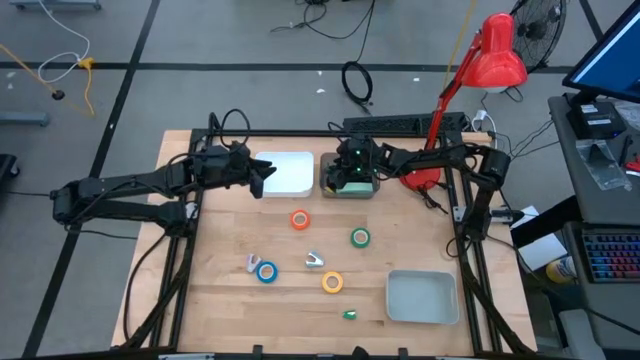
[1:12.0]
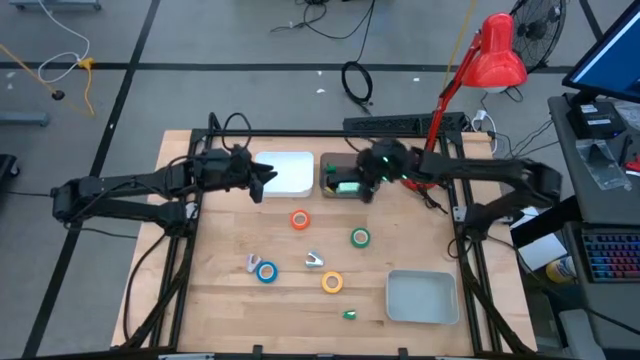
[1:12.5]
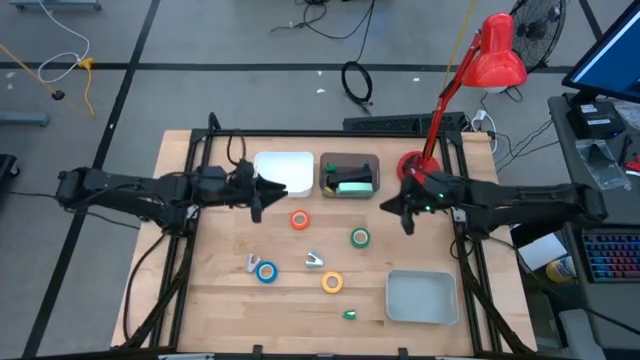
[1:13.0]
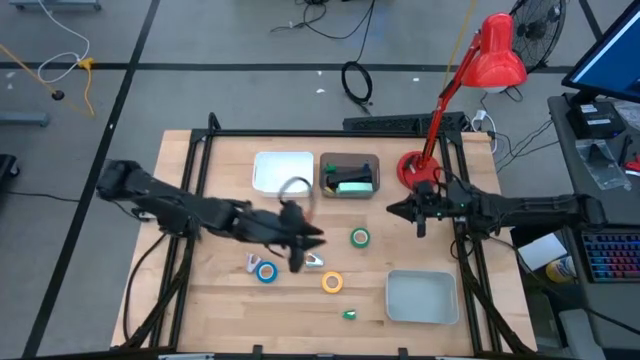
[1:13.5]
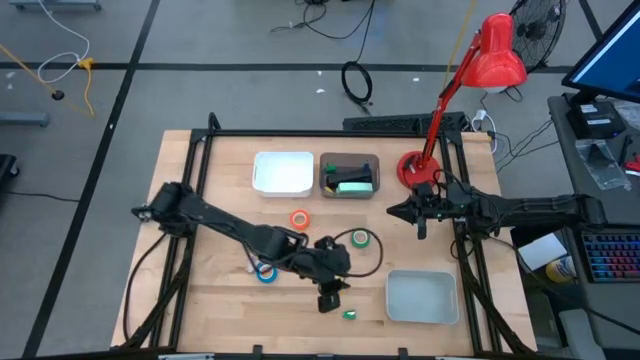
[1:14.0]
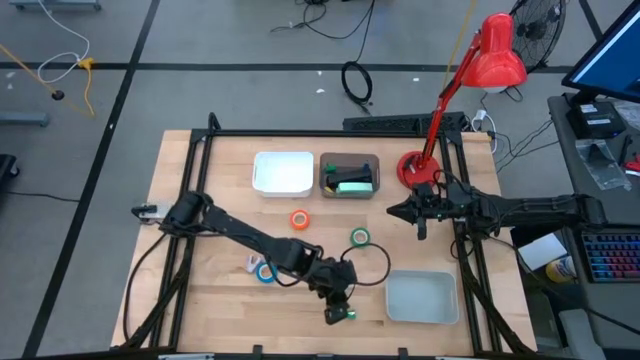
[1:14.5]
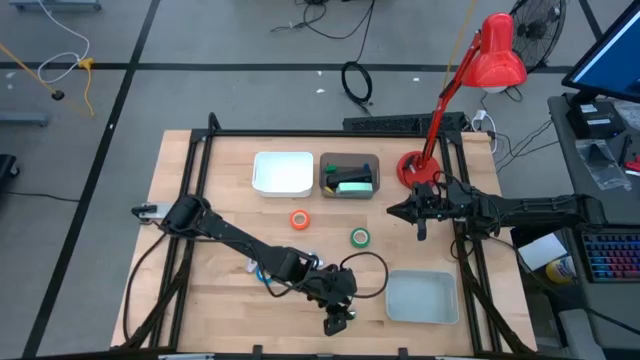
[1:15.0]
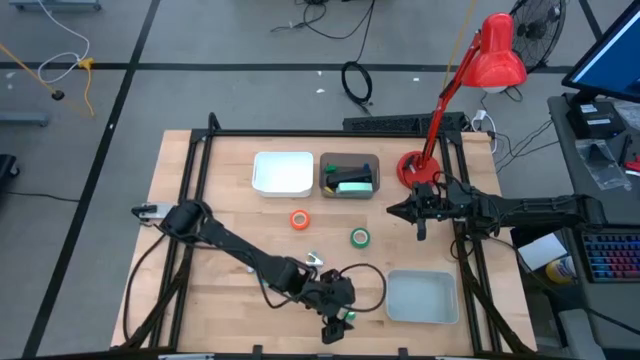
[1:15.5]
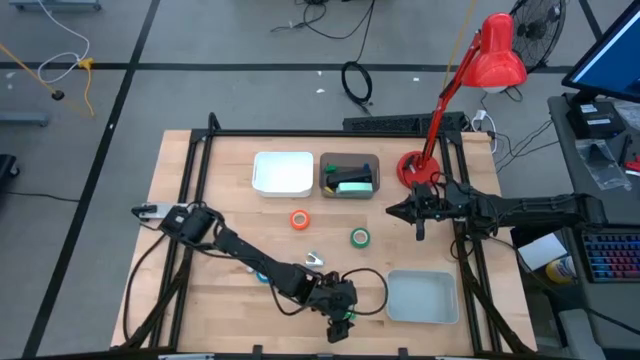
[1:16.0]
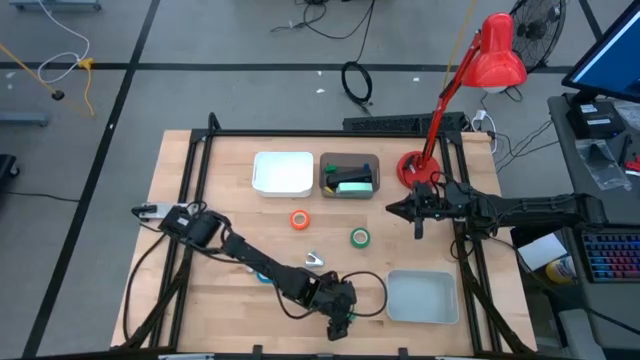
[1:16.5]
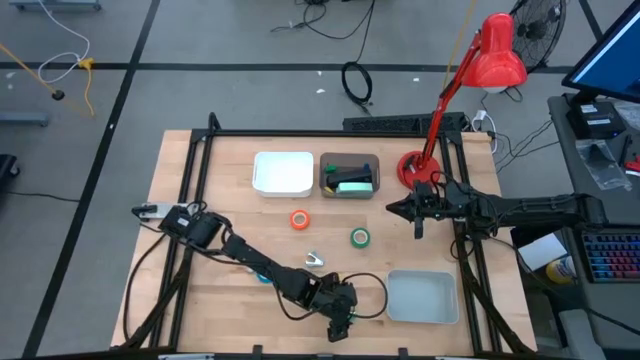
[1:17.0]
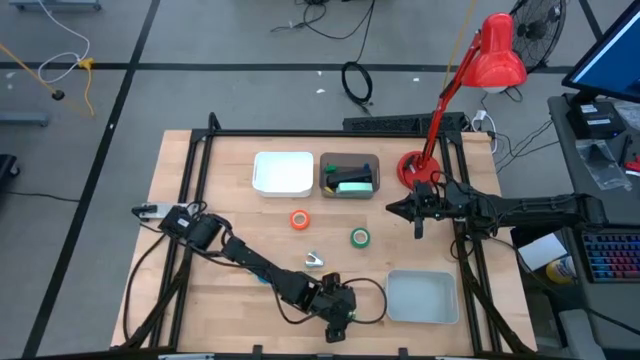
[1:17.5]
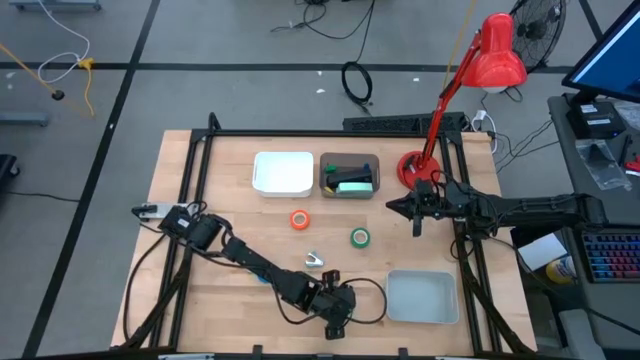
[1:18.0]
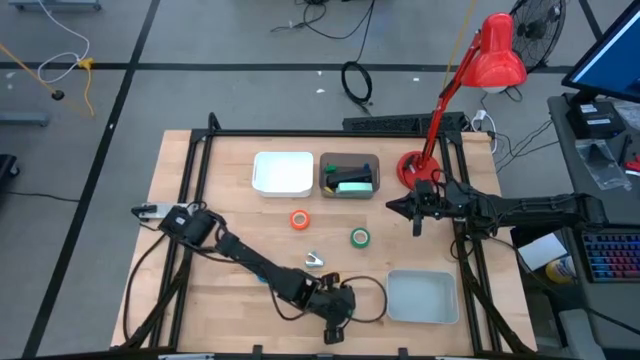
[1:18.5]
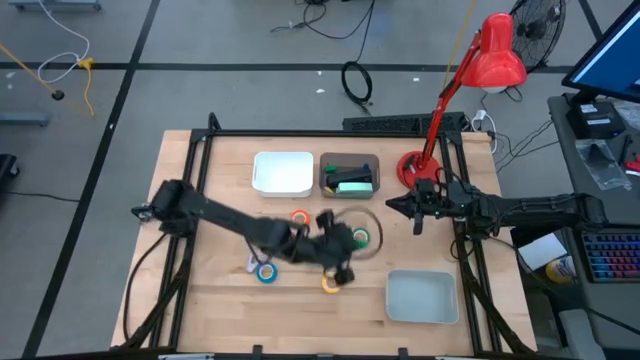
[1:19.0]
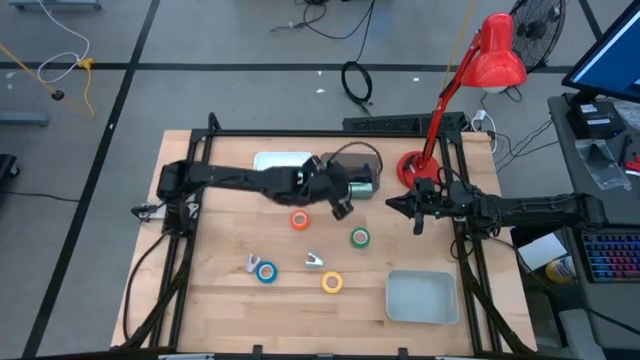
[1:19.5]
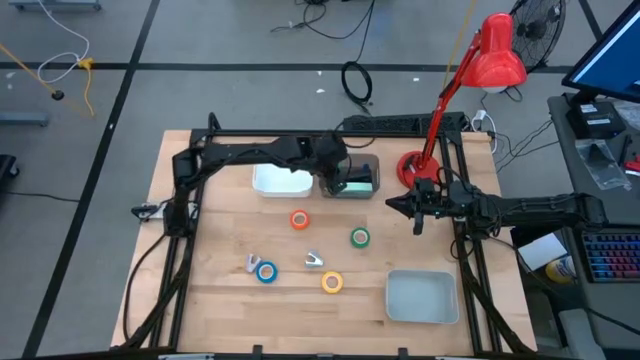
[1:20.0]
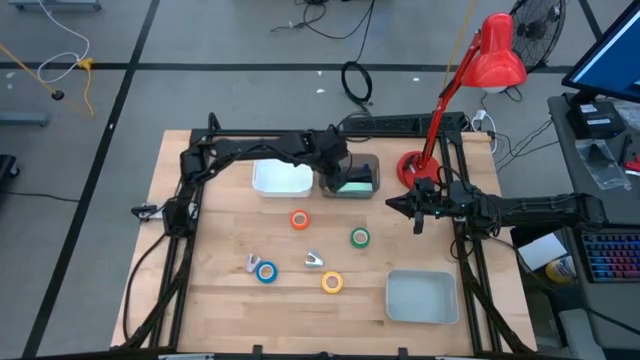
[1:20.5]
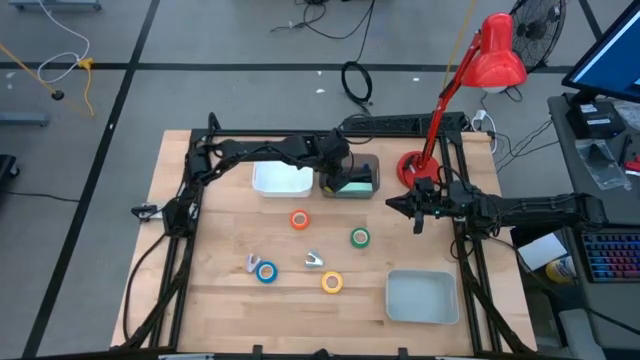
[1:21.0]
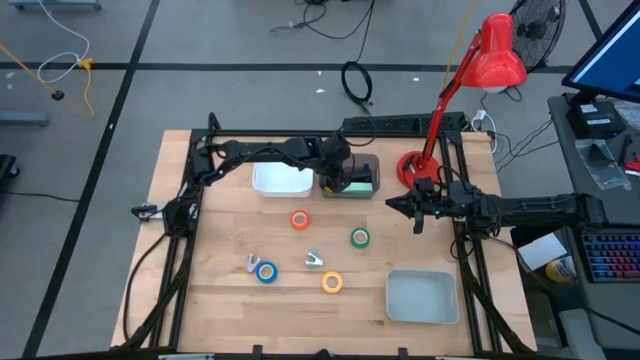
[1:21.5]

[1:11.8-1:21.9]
Task: Pick and place Stapler, Stapler remover, tape
Put the green stapler into the black bin

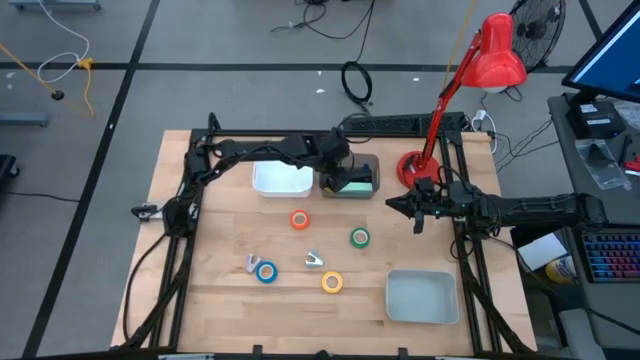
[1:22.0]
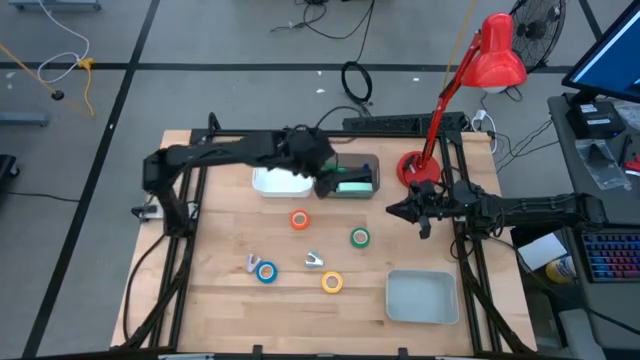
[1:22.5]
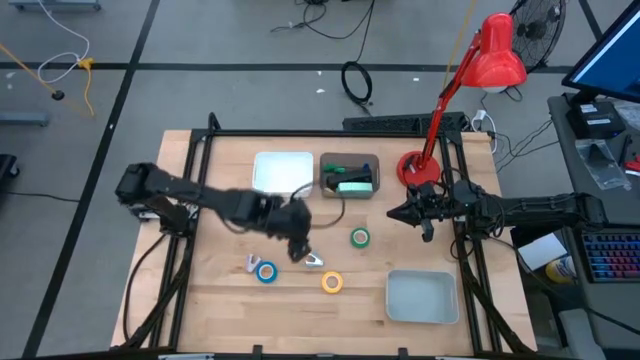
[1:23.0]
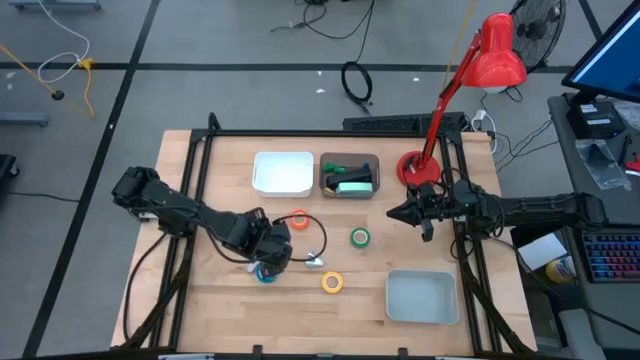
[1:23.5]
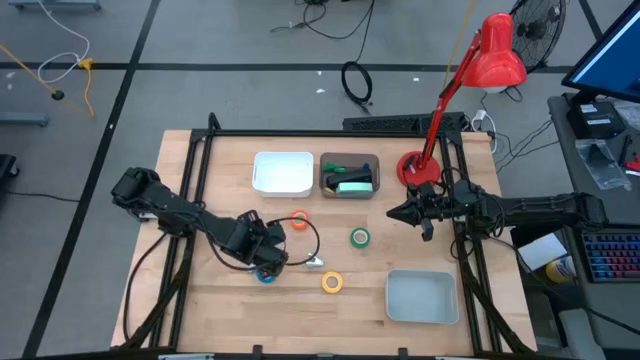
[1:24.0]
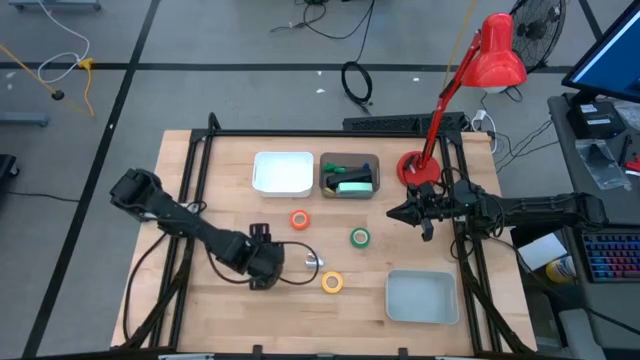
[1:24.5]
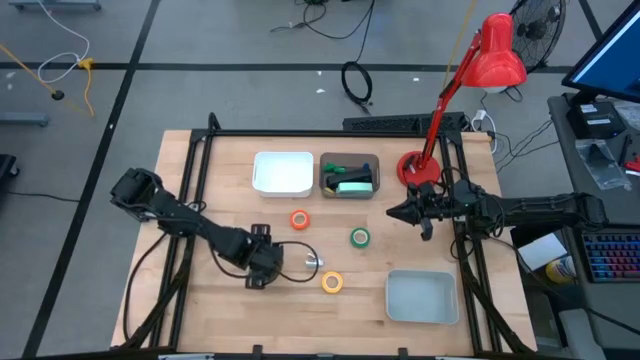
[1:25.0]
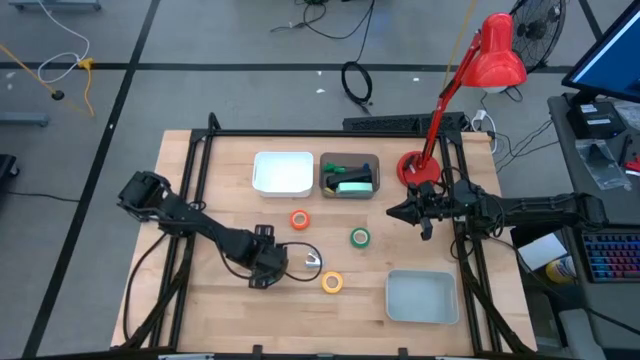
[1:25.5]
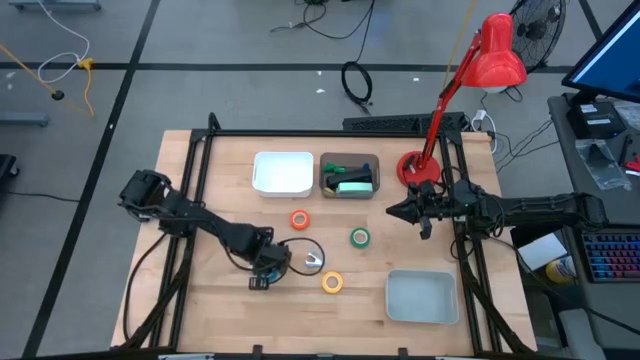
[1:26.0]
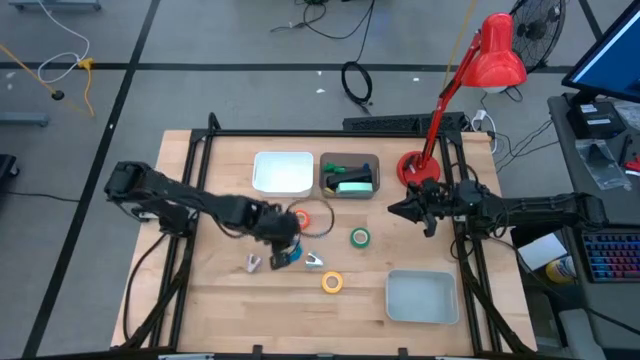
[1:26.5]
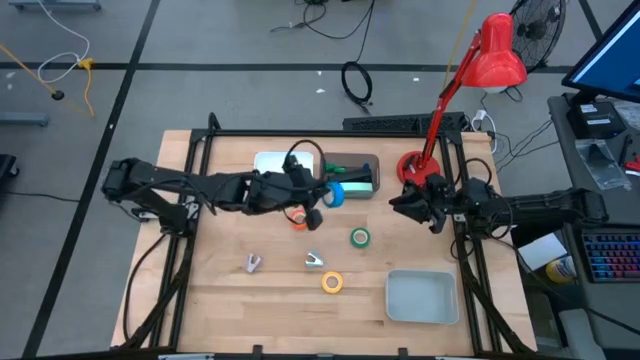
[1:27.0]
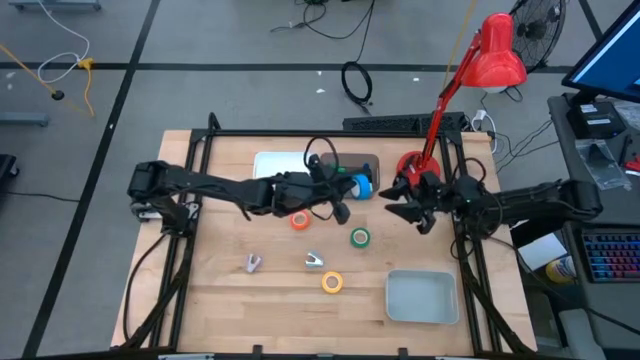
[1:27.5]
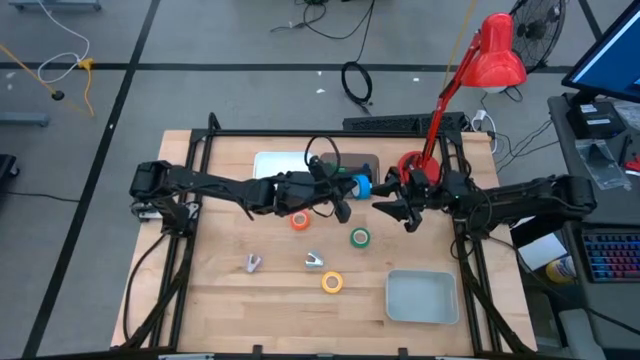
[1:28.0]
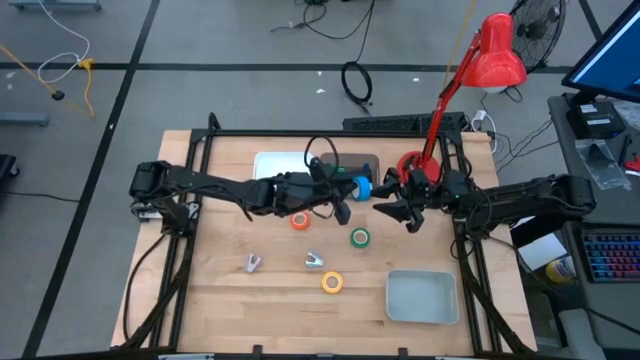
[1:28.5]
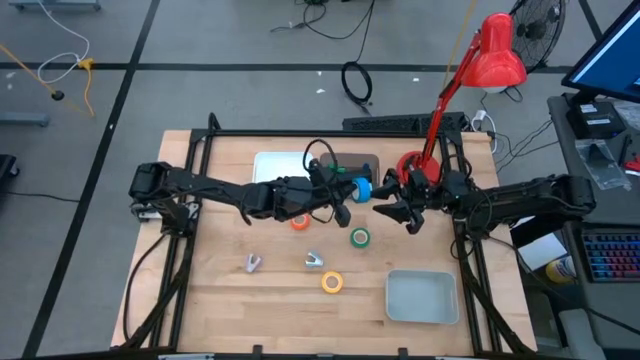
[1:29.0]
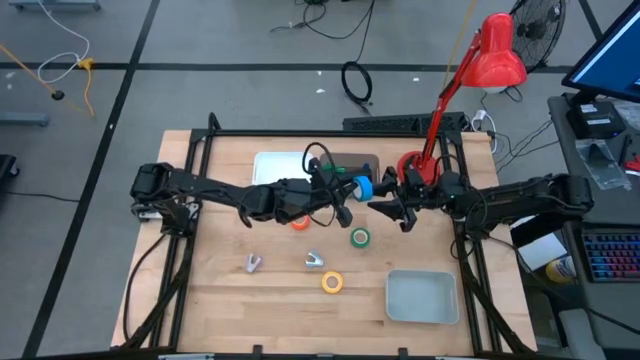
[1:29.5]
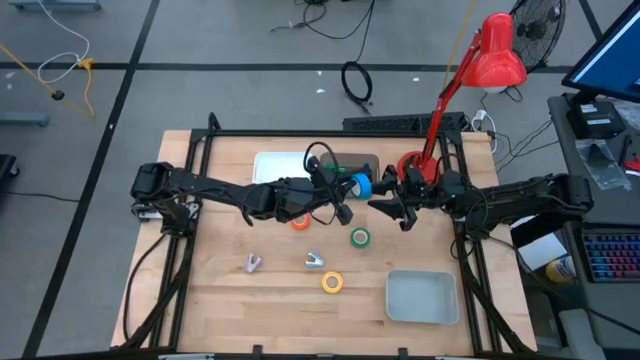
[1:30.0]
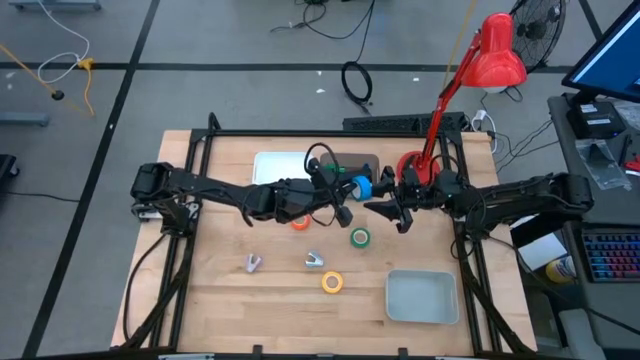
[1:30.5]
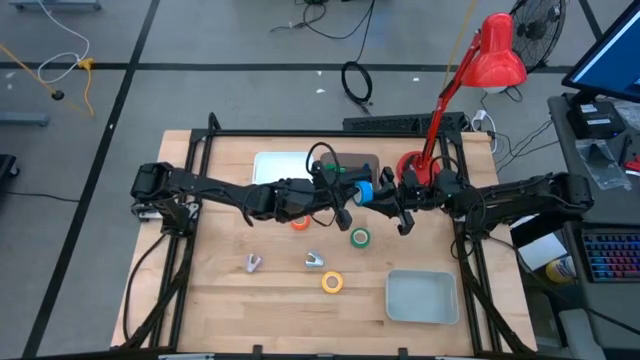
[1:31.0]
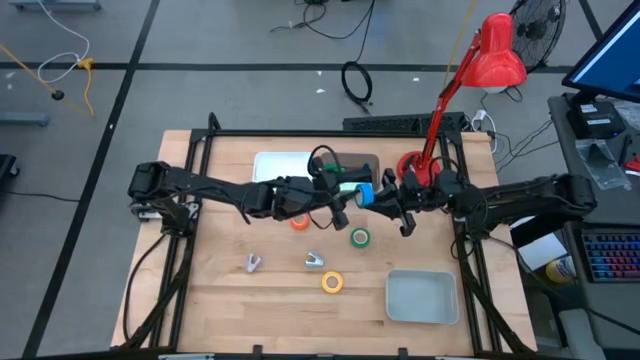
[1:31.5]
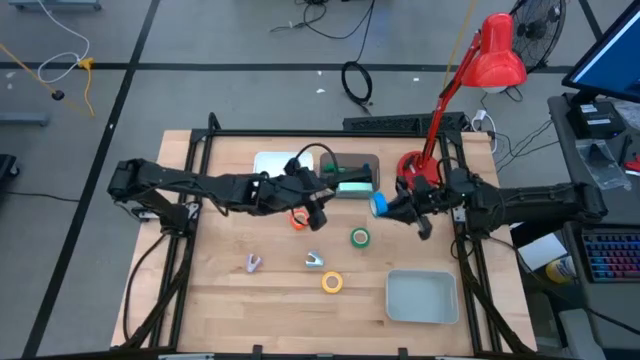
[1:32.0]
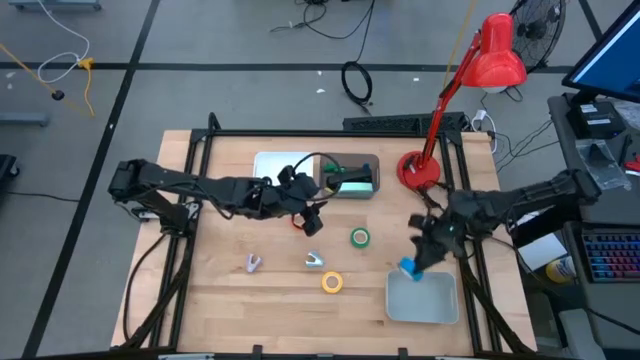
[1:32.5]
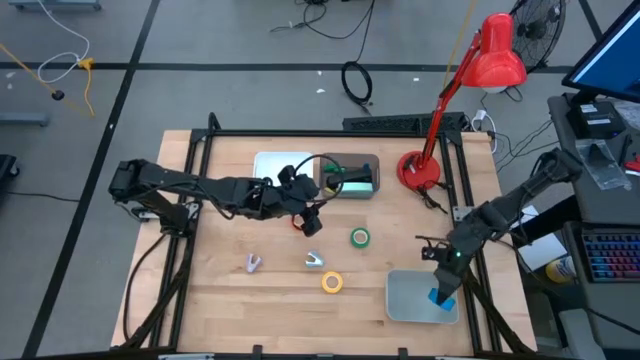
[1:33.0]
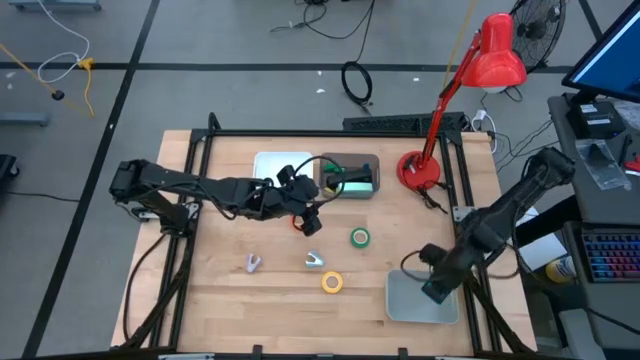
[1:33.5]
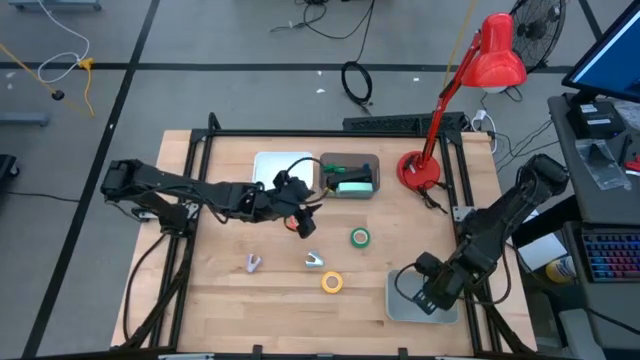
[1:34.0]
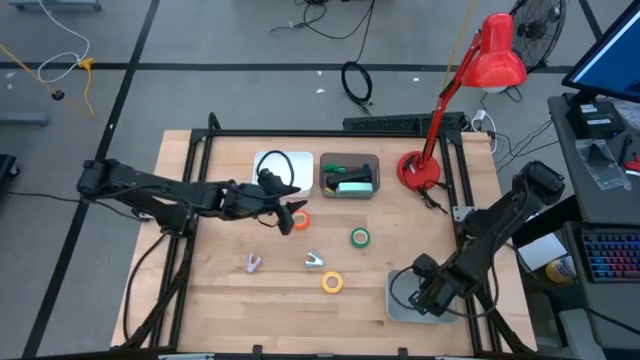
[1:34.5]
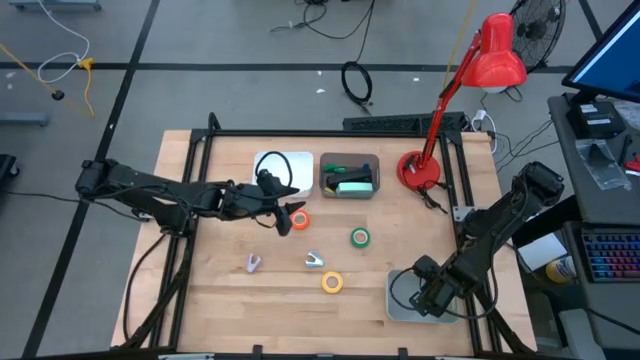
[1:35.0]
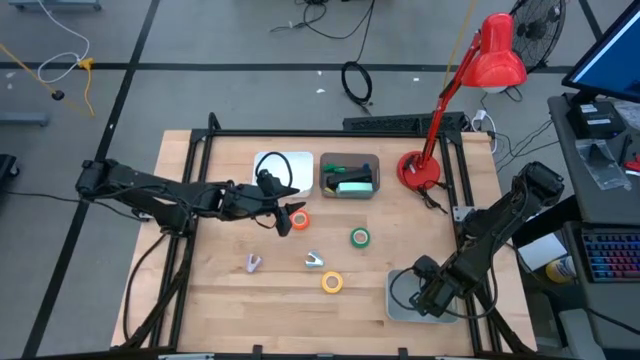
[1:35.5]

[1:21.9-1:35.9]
Put the blue tape into the gray bin
